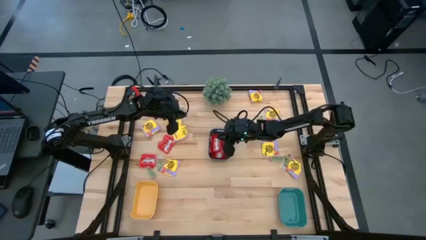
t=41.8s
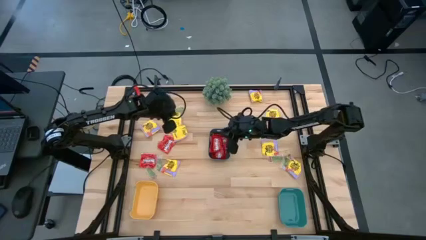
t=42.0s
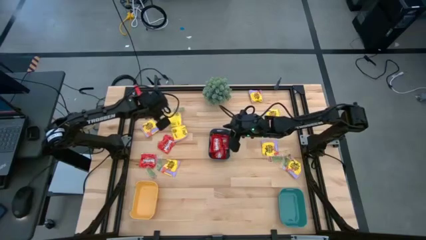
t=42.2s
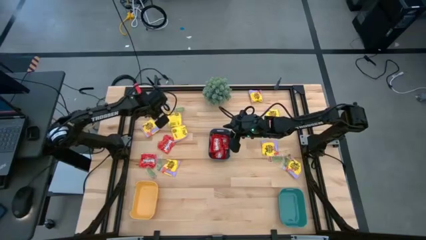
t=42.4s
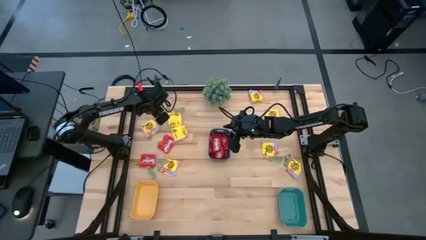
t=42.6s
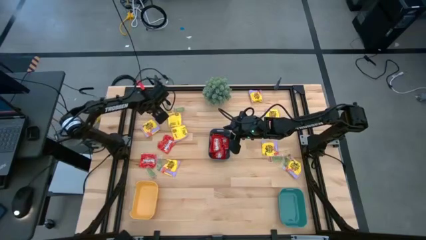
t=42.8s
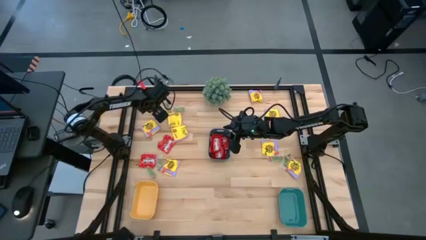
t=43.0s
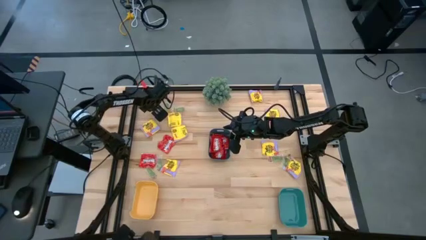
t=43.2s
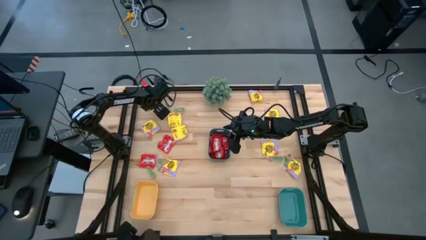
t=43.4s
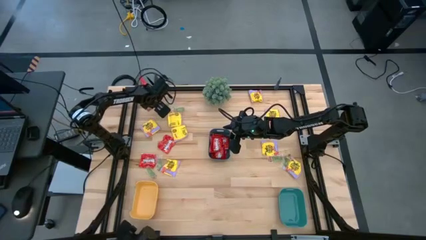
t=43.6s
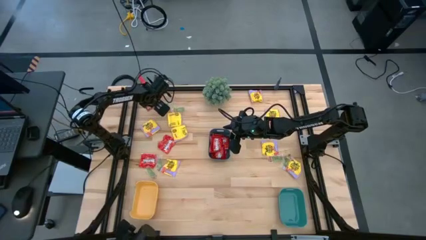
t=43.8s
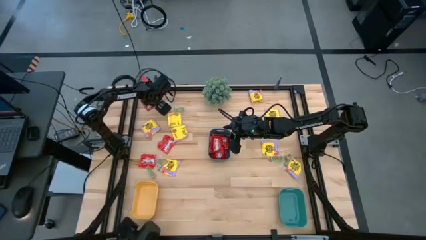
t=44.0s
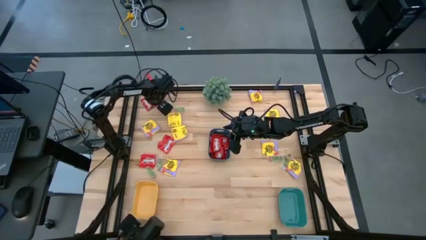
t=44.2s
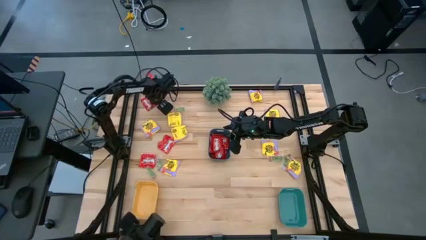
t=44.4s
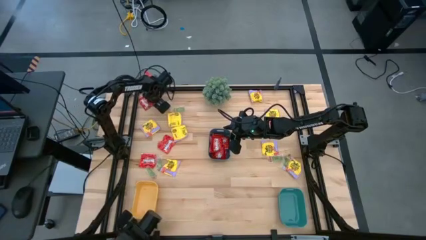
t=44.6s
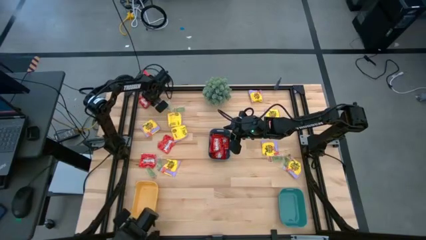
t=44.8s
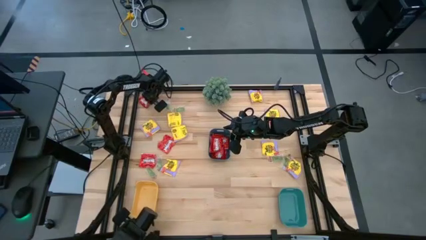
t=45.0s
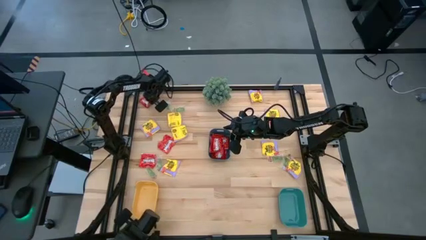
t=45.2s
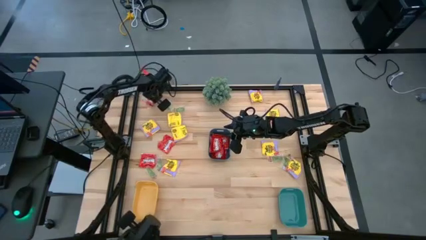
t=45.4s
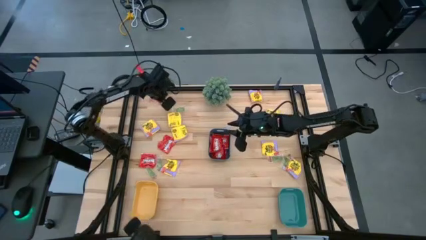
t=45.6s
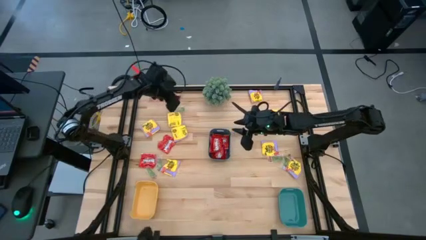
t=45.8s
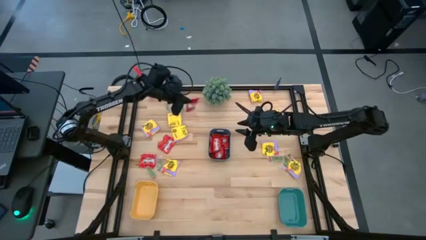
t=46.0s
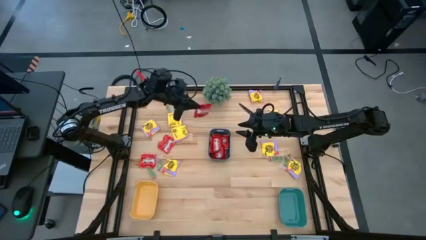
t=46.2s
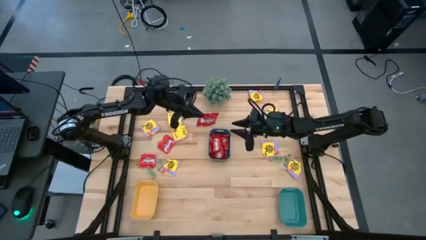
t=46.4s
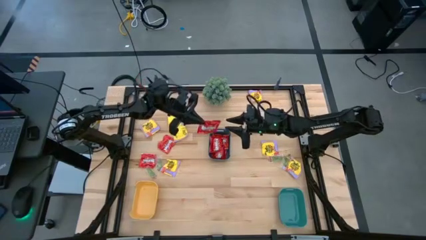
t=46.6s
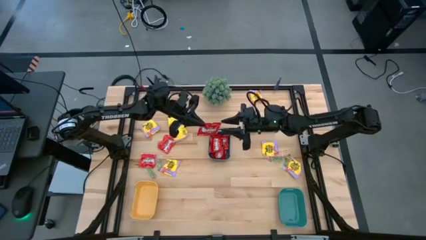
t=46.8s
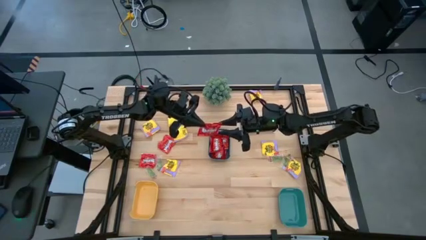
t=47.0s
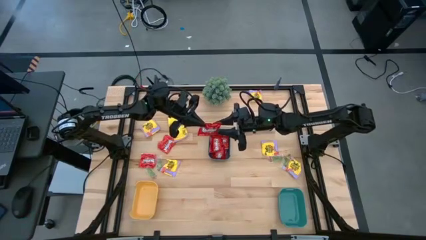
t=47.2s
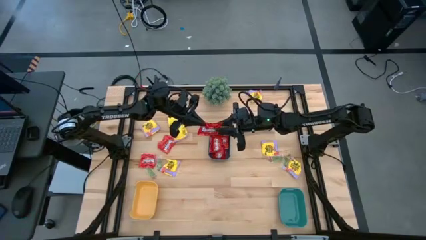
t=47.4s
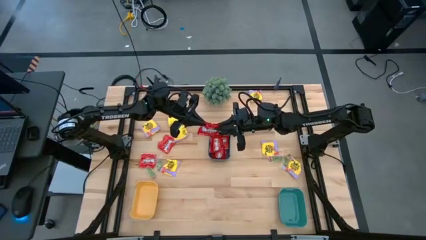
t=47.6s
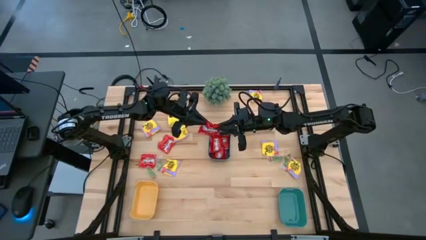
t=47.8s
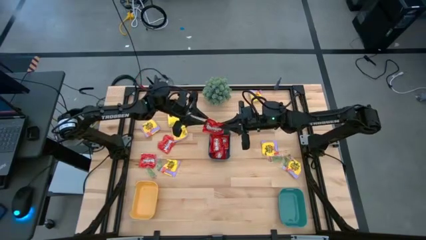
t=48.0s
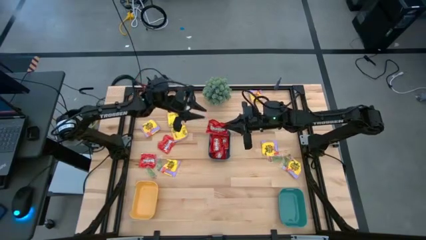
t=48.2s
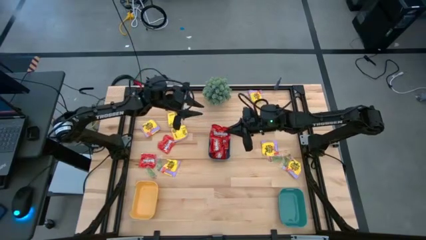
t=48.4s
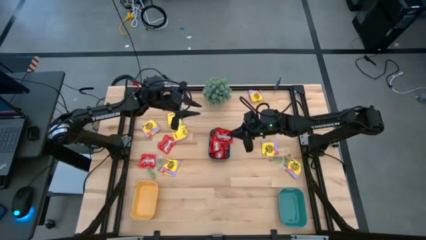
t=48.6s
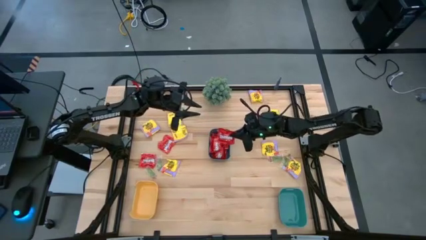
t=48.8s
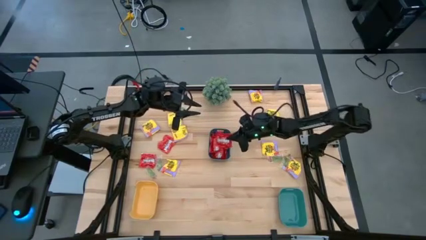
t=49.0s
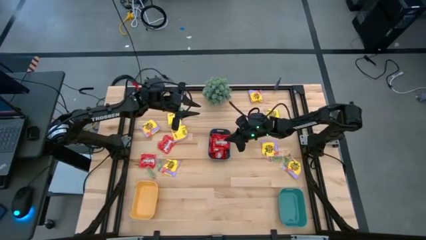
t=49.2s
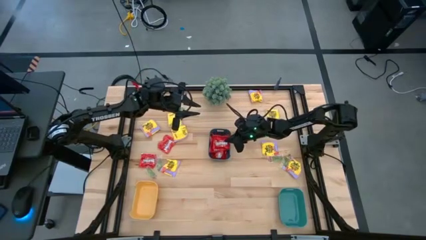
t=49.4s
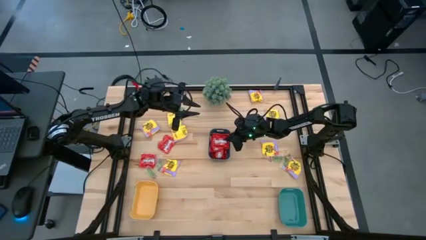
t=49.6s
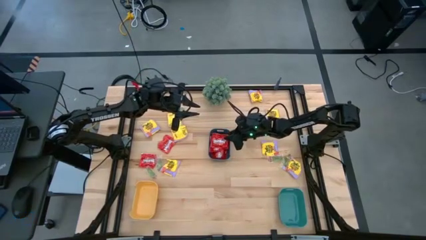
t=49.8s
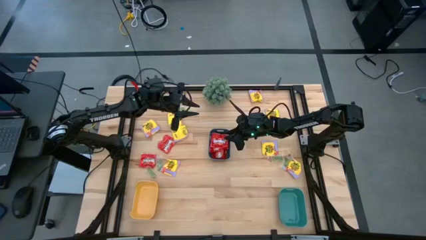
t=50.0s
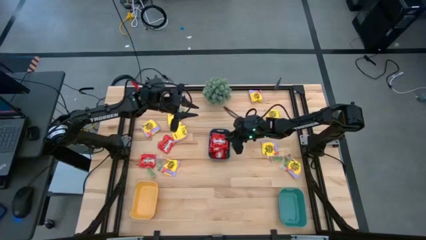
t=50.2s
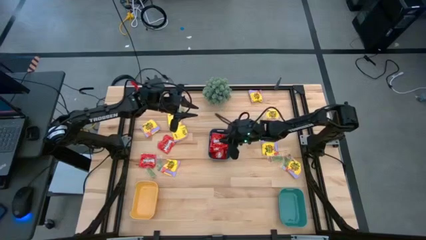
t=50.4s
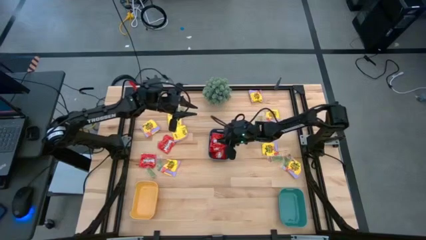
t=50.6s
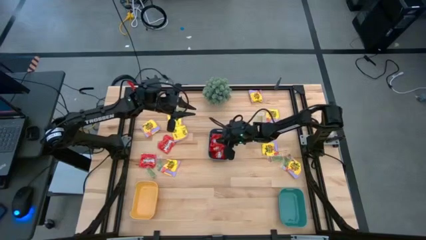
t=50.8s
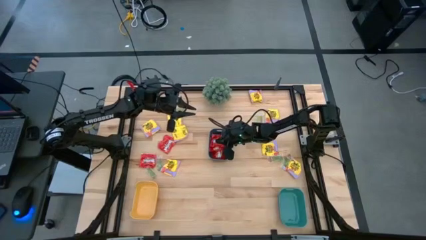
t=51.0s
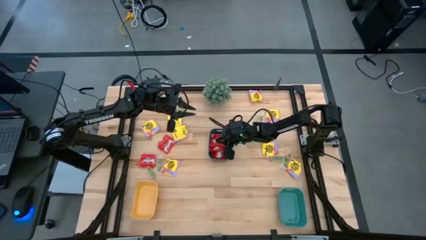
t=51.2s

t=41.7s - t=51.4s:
Task: Sort candy
Put the red candy pack into the blue bin

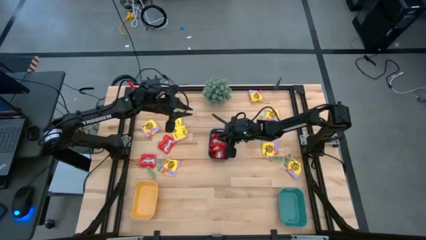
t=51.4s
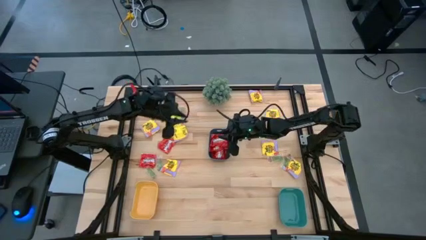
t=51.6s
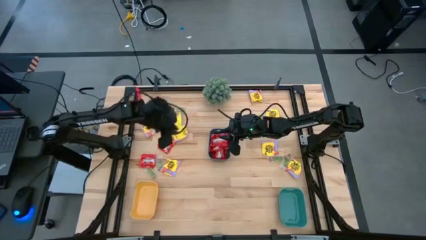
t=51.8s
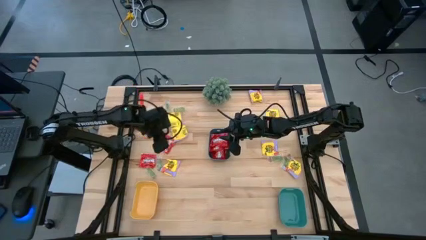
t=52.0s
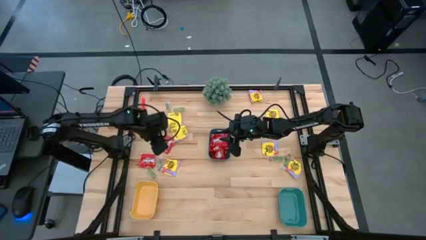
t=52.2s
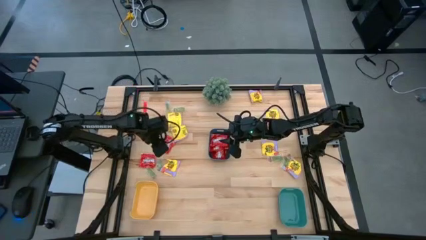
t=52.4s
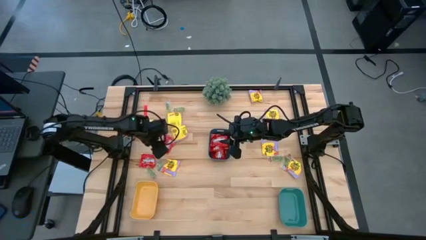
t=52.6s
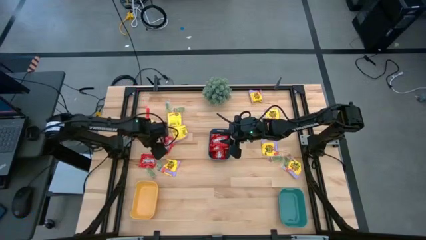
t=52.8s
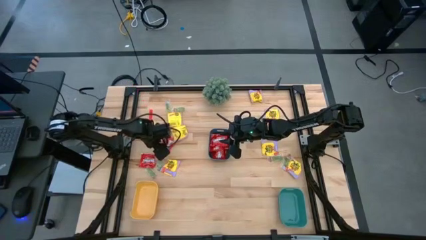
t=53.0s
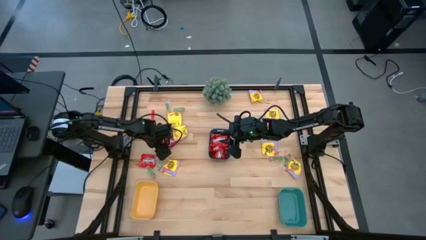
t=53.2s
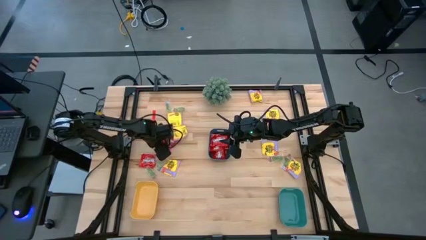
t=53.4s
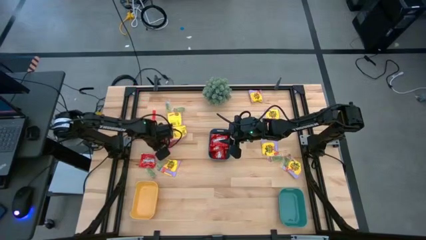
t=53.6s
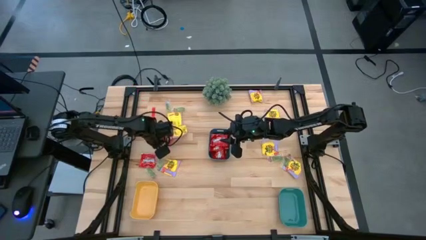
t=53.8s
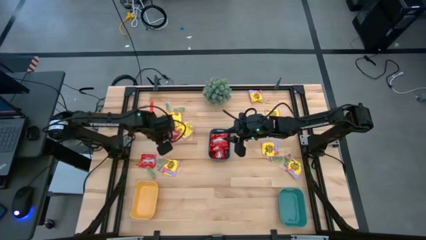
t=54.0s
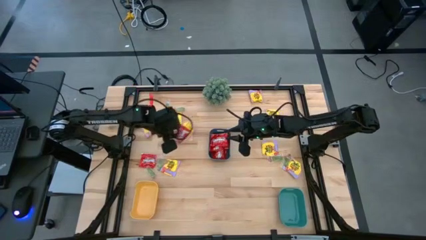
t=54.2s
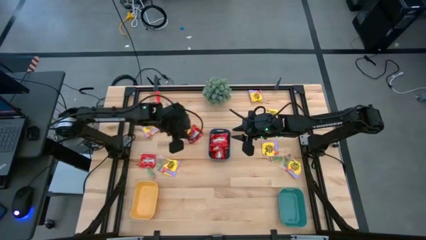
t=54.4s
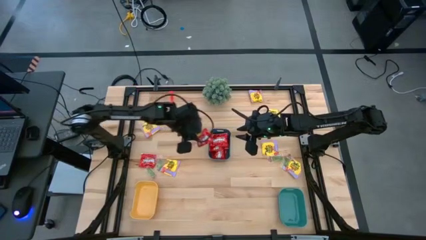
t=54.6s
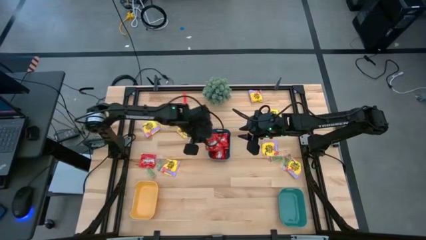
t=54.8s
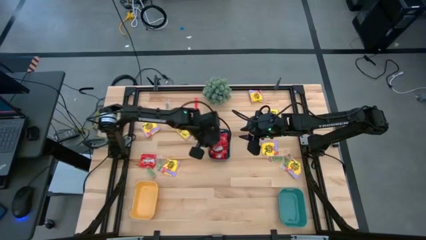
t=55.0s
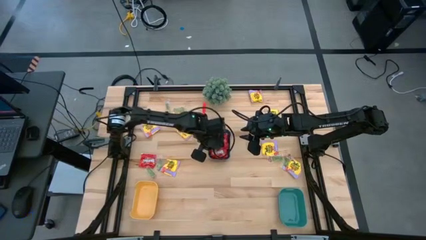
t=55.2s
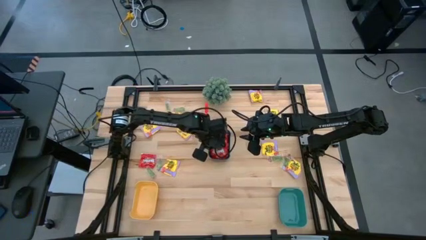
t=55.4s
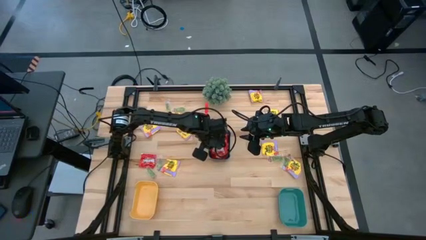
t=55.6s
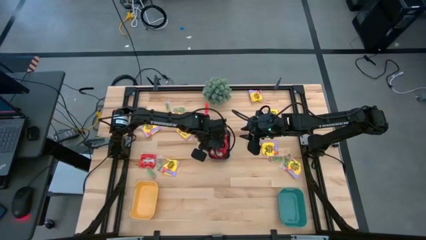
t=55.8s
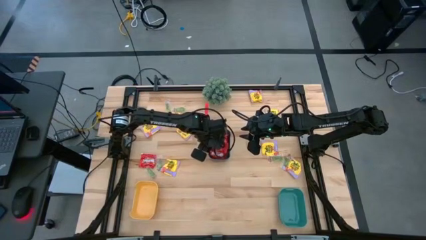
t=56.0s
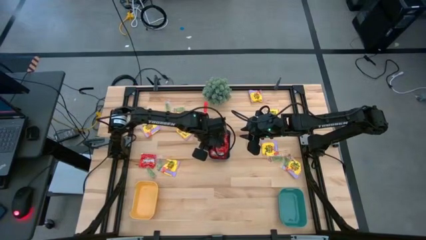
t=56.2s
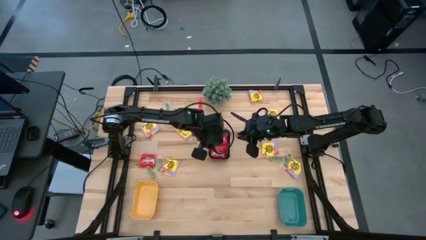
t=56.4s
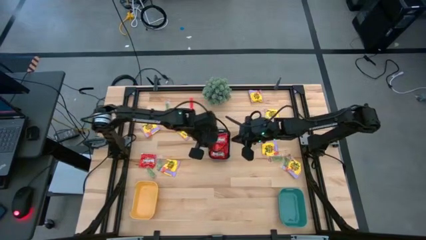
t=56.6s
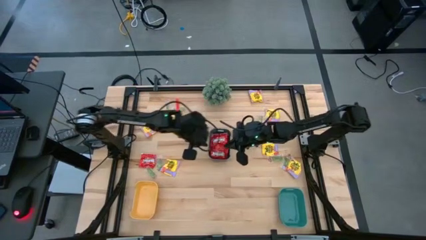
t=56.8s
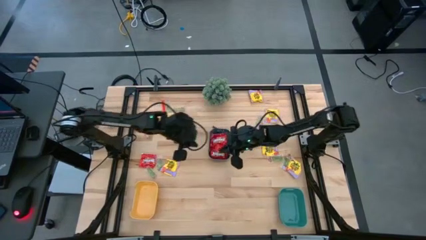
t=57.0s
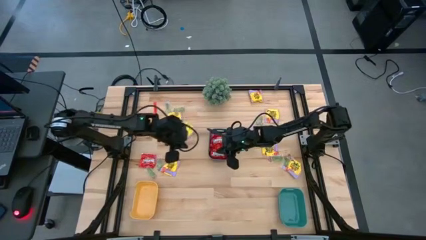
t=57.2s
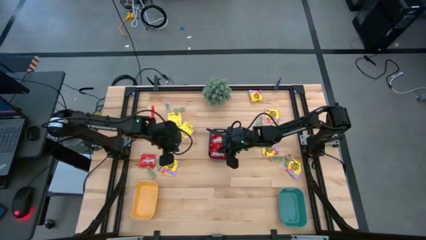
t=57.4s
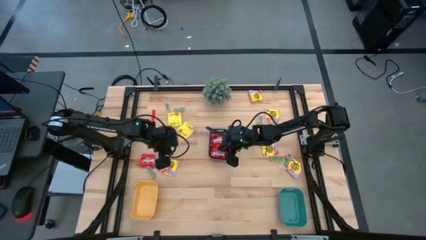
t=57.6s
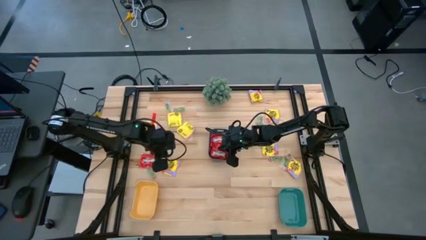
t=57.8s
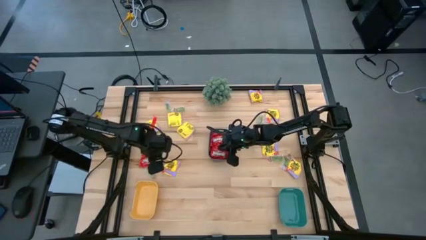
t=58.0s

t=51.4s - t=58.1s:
Put the red candy pack into the blue bin
